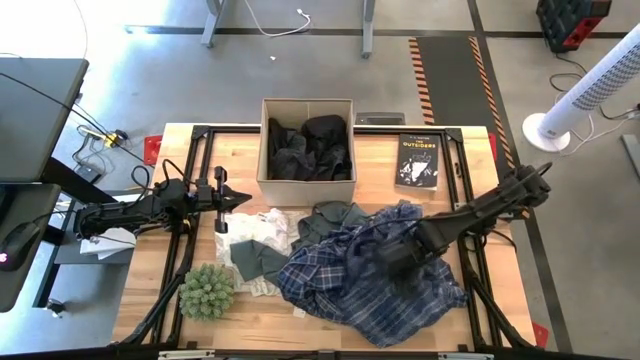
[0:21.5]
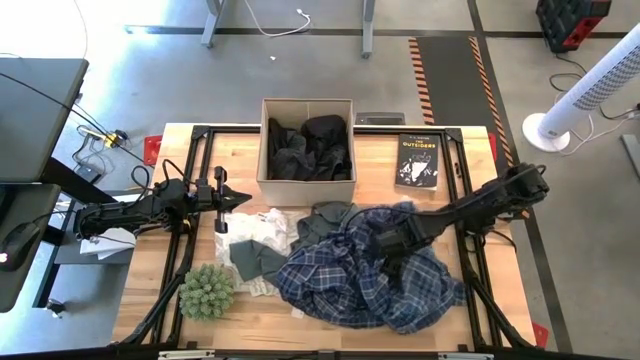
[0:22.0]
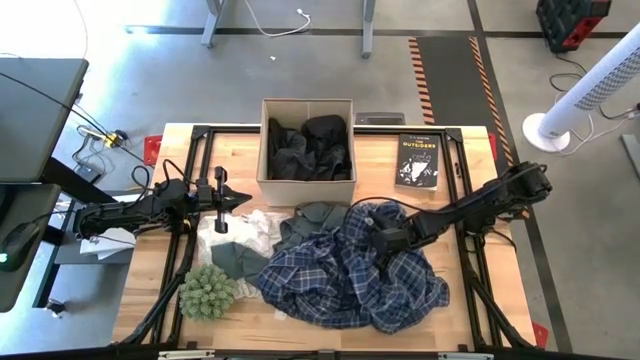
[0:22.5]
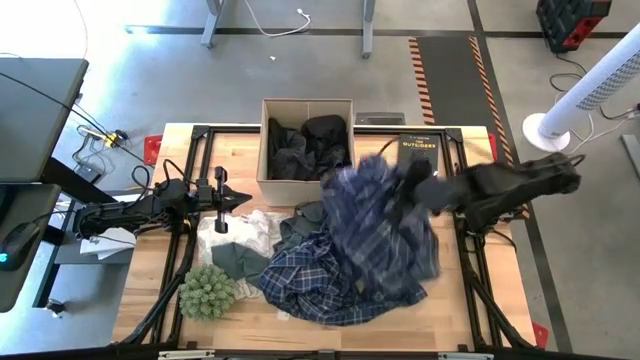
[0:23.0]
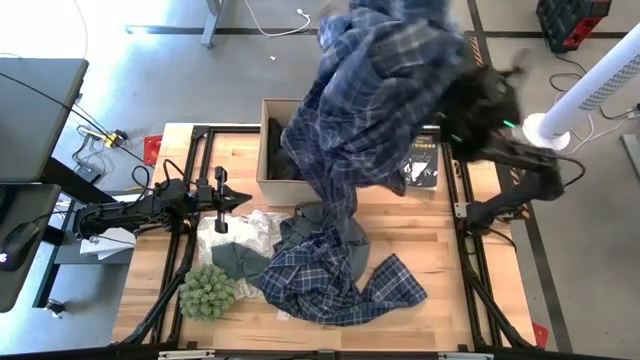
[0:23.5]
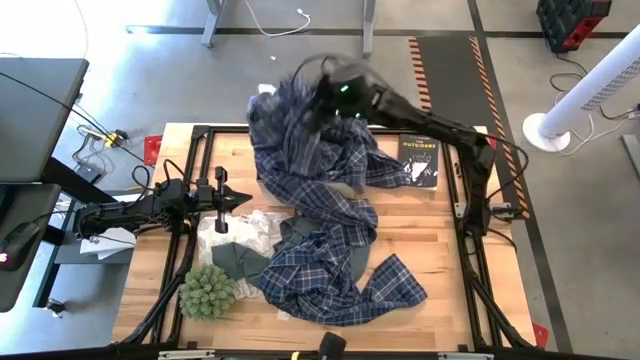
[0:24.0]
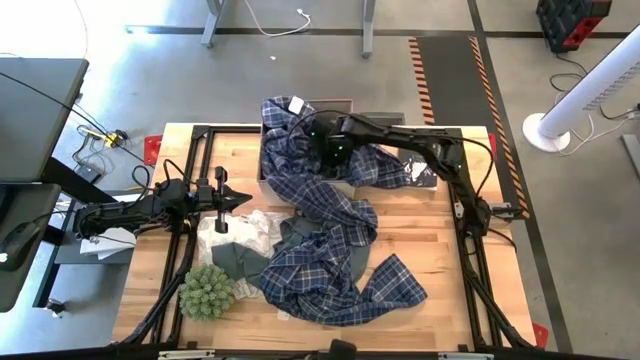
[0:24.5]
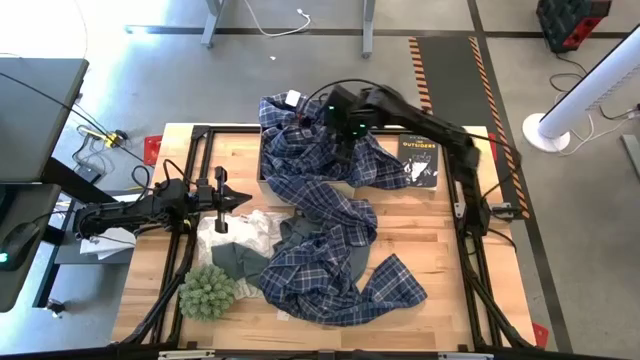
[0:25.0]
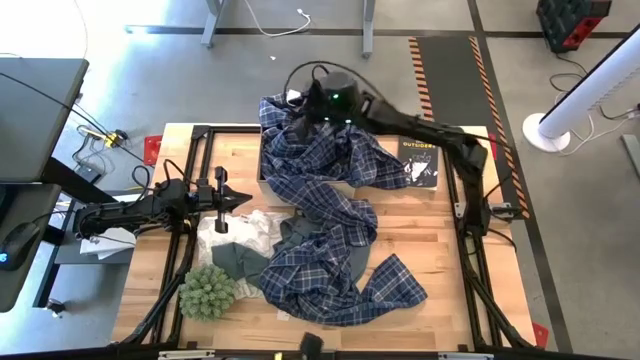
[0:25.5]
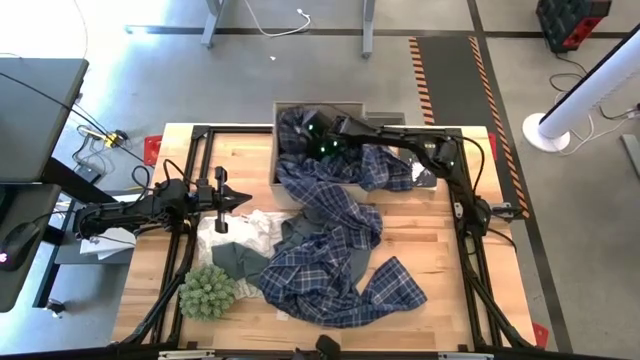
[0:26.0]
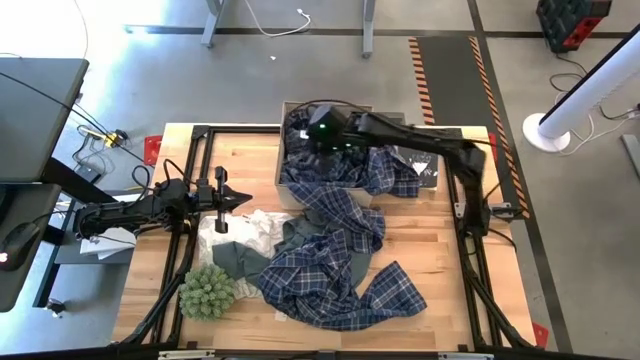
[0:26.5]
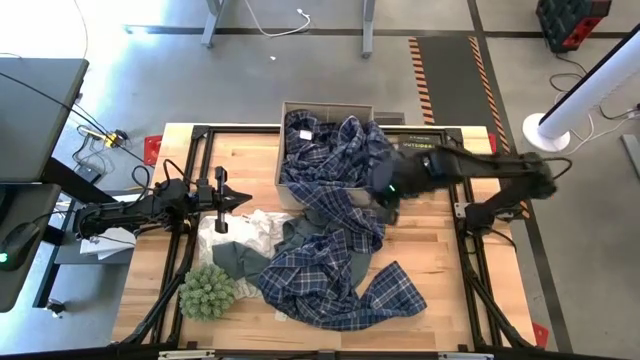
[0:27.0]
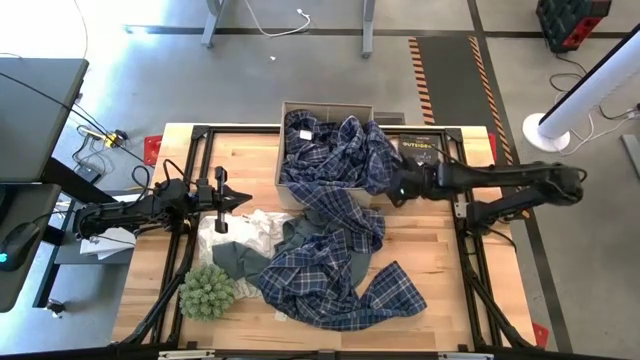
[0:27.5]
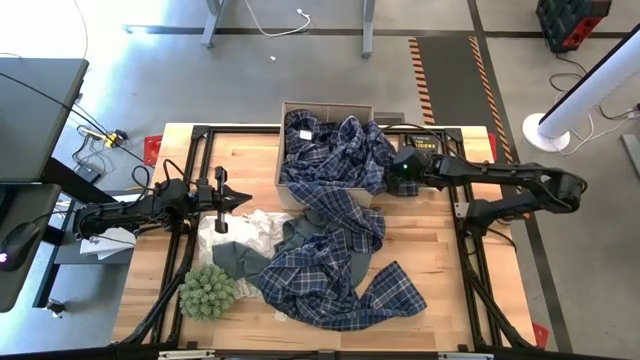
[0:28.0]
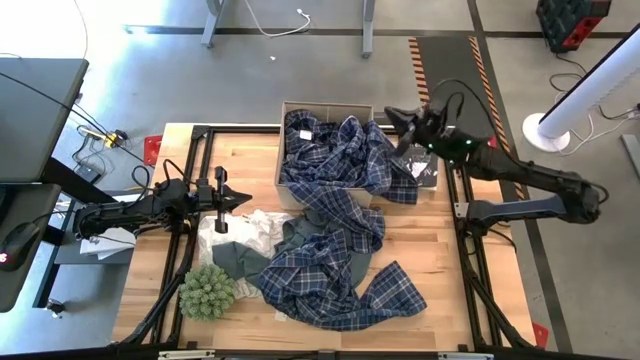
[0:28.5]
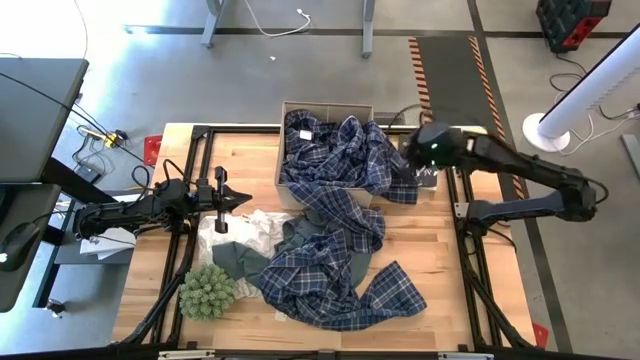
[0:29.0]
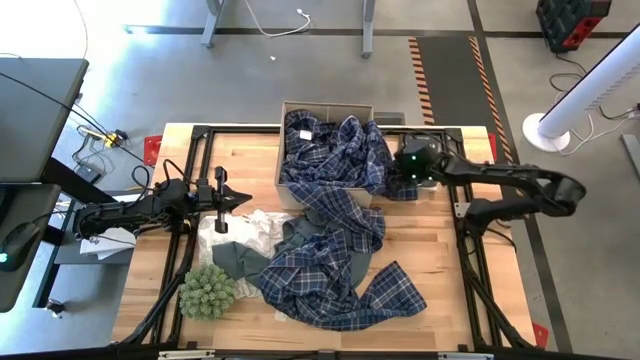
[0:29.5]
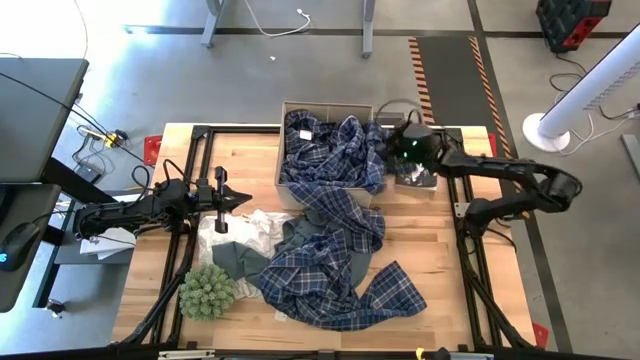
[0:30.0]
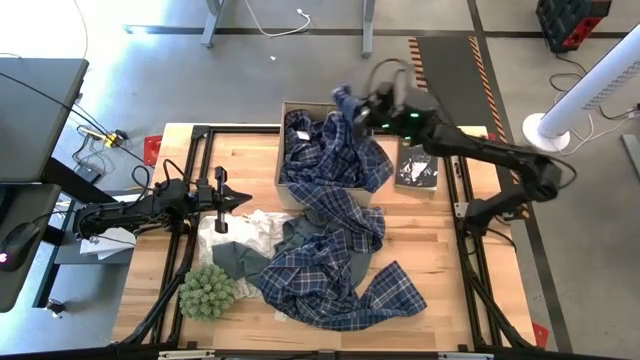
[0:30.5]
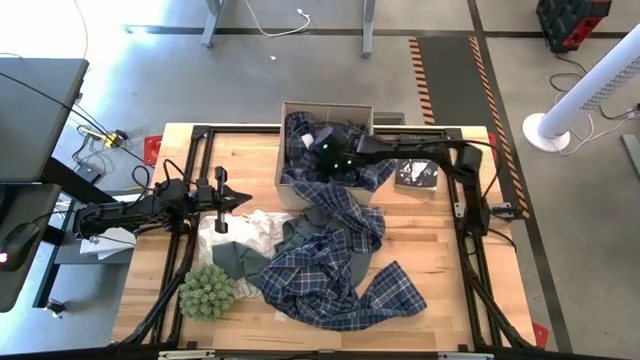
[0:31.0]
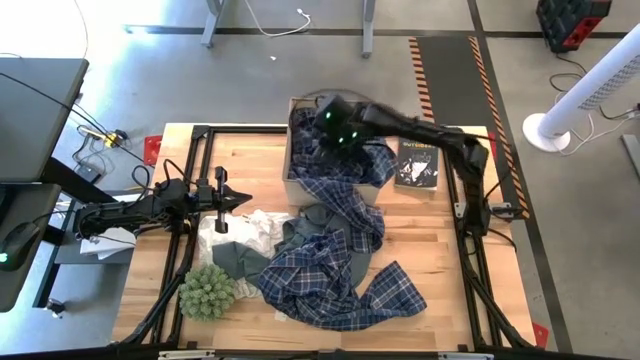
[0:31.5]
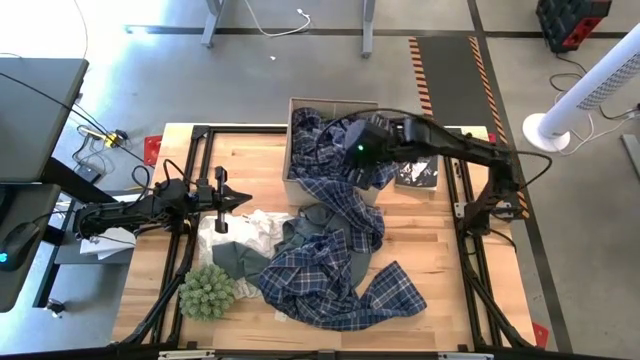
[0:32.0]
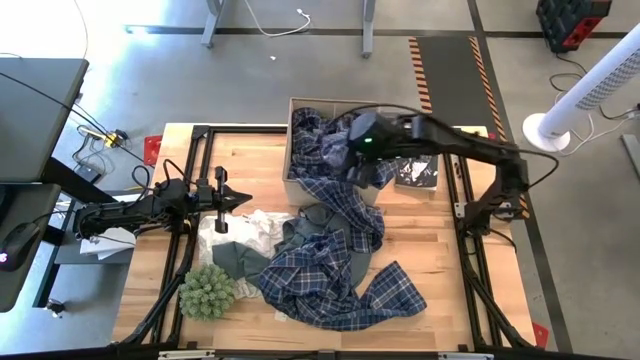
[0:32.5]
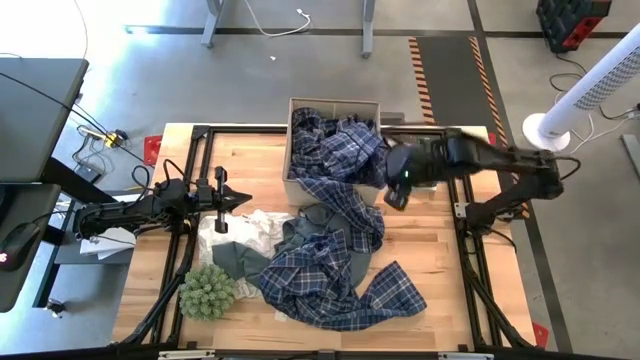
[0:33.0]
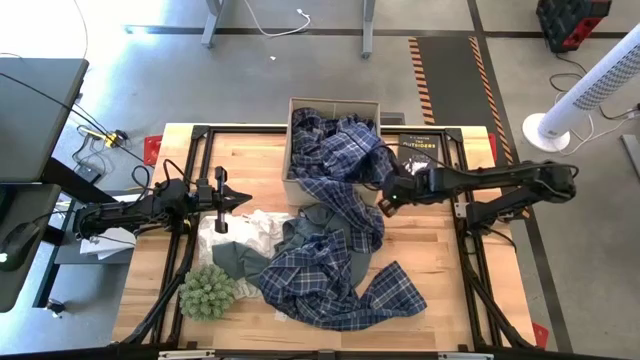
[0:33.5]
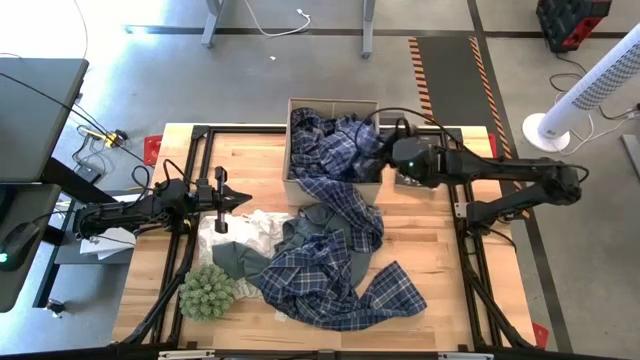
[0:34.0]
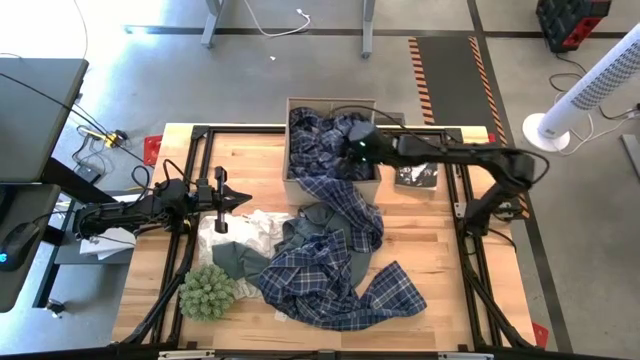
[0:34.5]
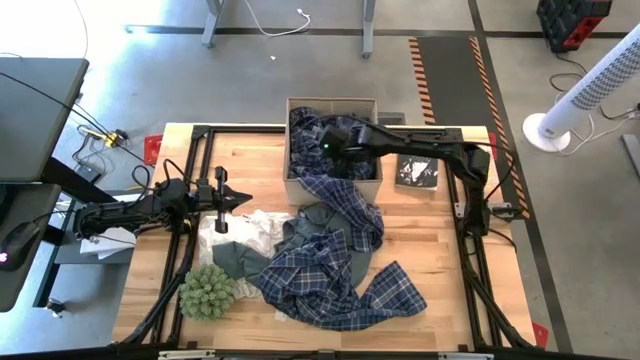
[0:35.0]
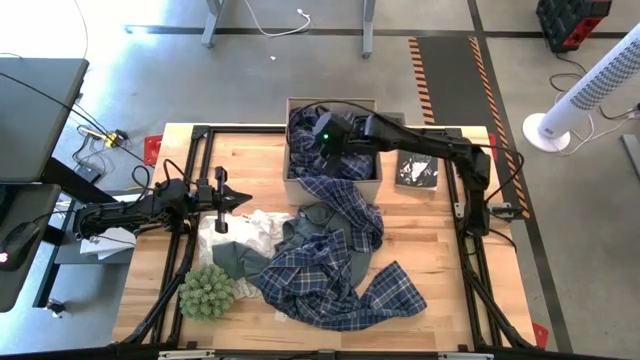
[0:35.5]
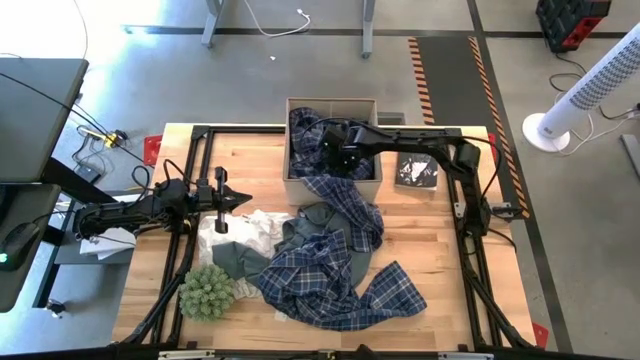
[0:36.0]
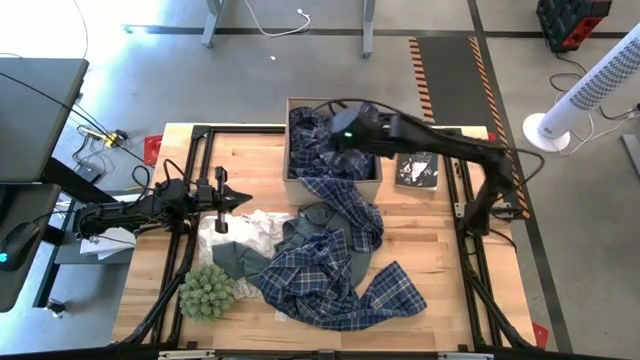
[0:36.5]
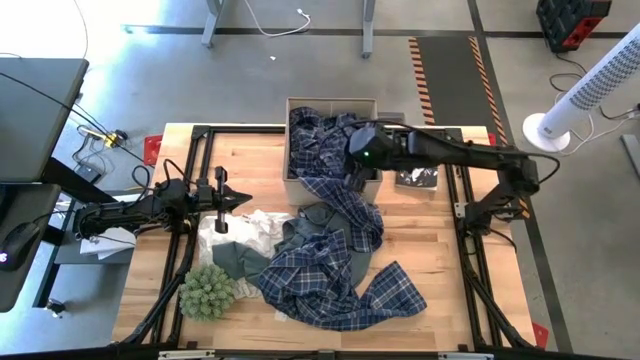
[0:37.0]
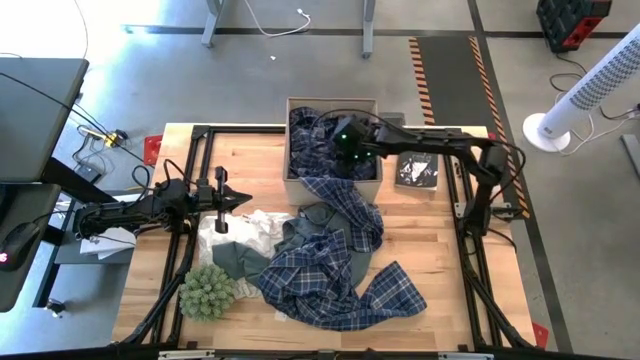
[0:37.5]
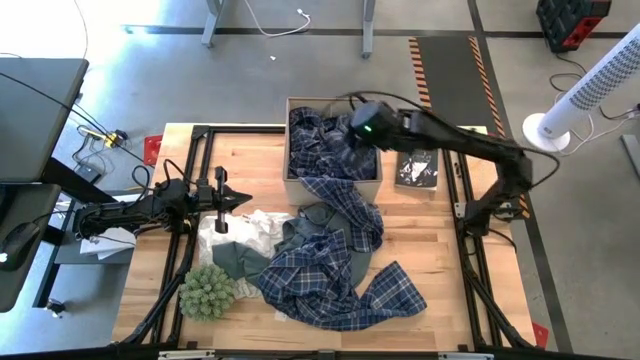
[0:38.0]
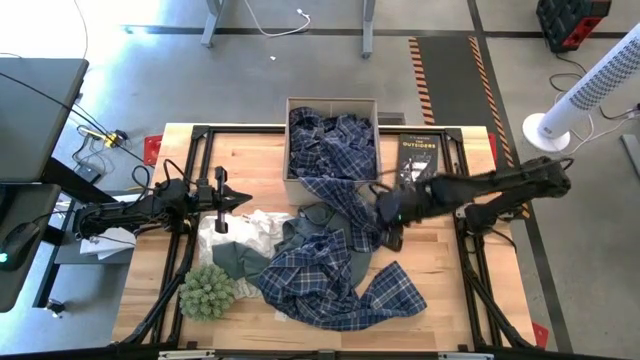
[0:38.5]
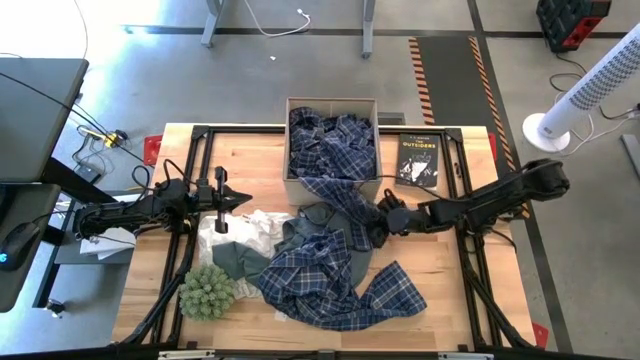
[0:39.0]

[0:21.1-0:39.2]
Task: Sort clothes
Put the blue long sleeve polo into the white bin

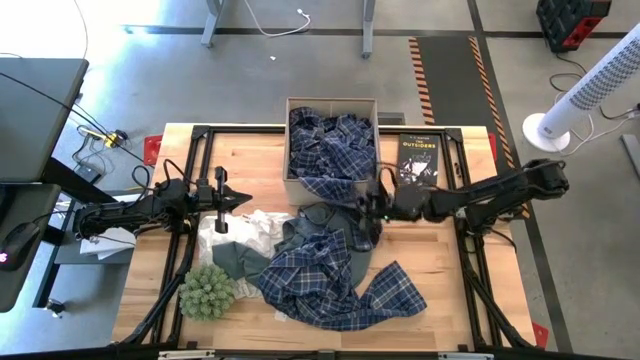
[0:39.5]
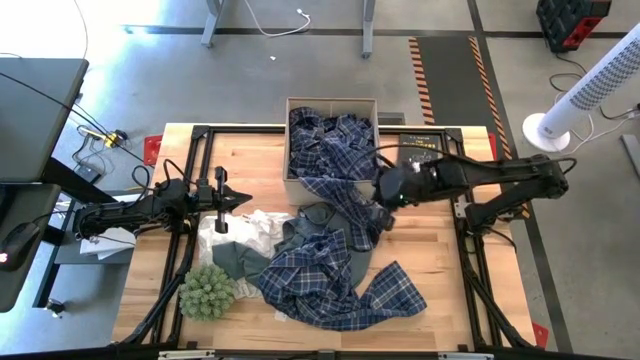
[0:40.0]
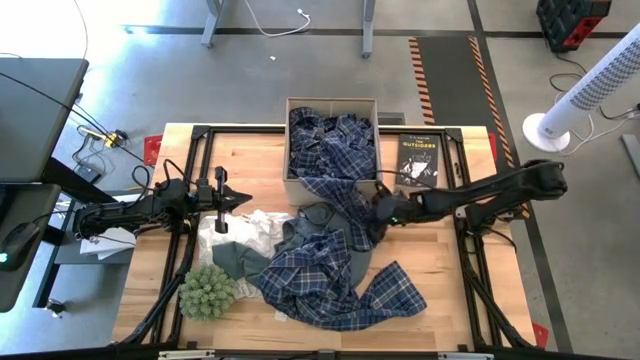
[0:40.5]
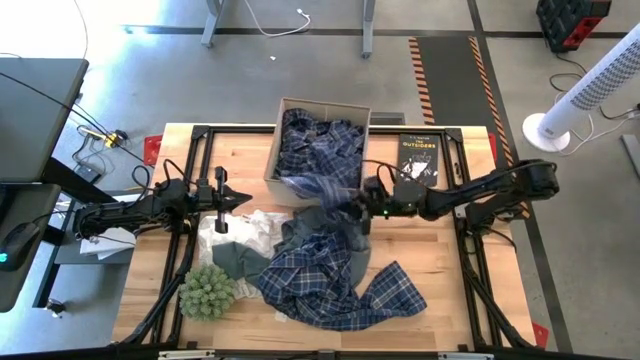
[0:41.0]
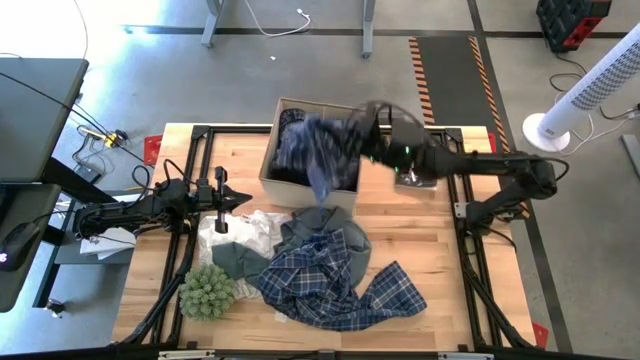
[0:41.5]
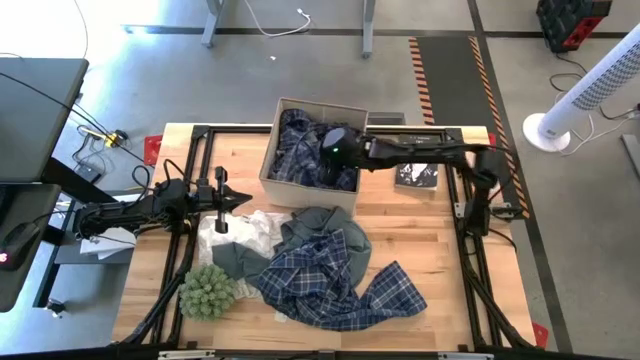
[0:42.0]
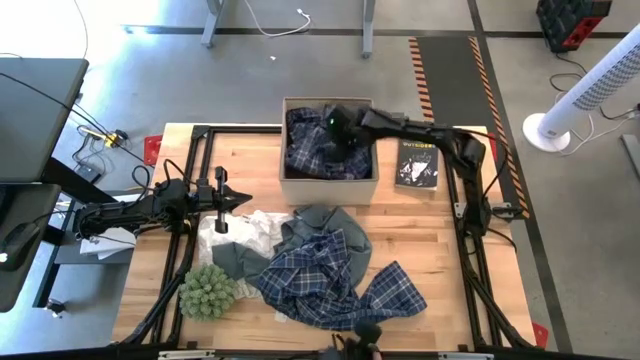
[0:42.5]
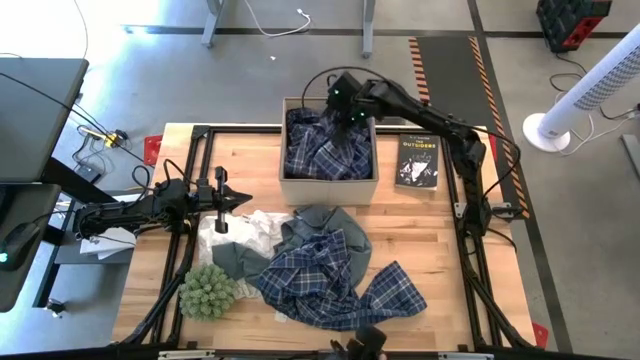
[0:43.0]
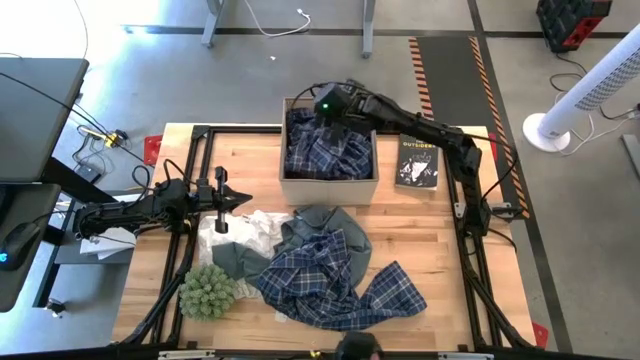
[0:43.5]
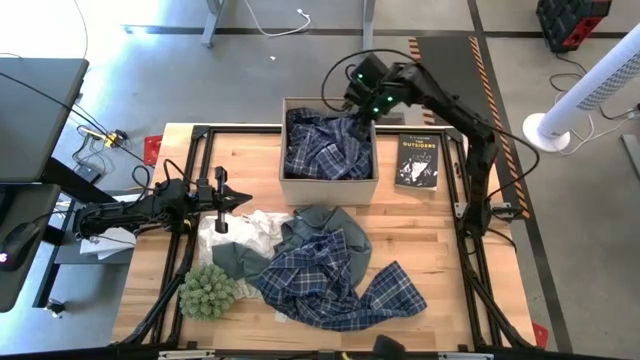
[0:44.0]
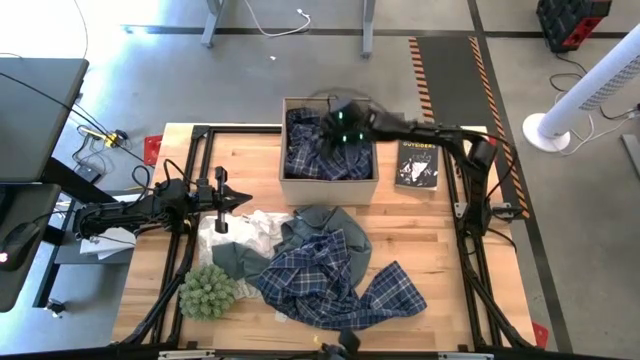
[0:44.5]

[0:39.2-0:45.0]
Put the top middle blue long sleeve polo into the white bin
